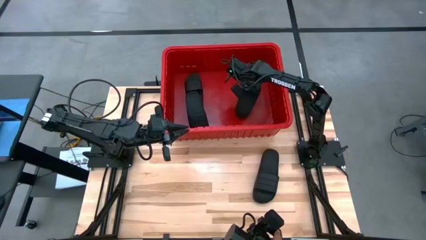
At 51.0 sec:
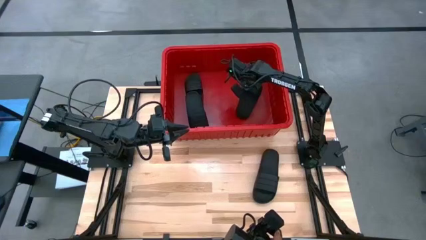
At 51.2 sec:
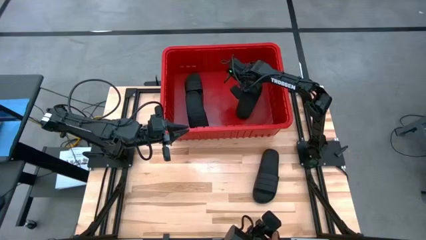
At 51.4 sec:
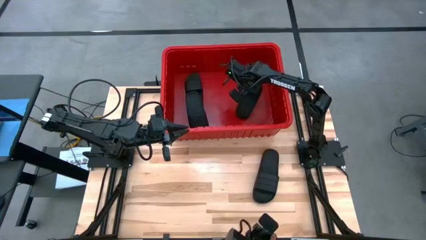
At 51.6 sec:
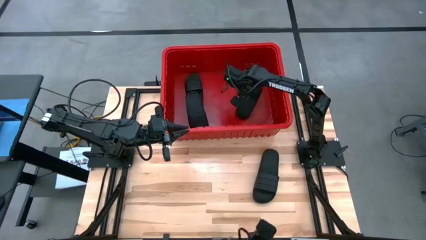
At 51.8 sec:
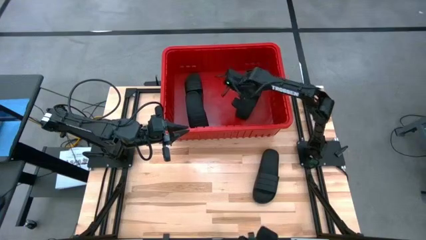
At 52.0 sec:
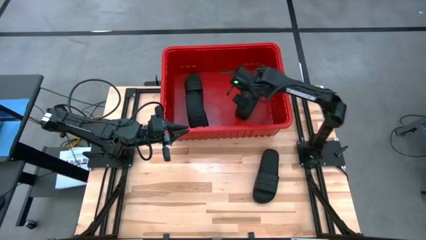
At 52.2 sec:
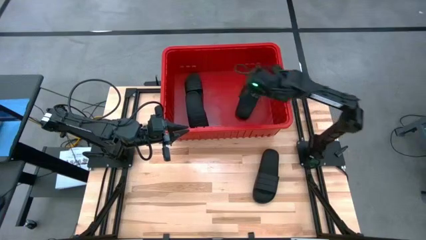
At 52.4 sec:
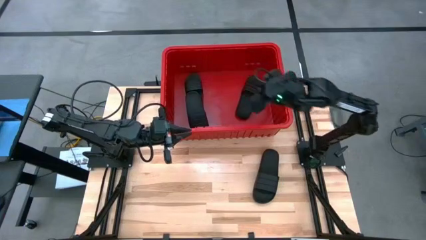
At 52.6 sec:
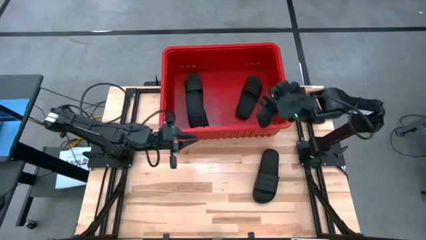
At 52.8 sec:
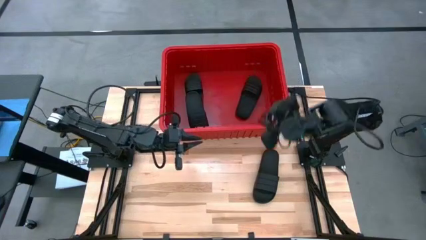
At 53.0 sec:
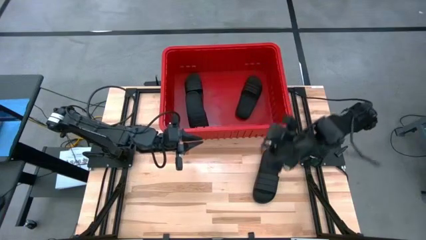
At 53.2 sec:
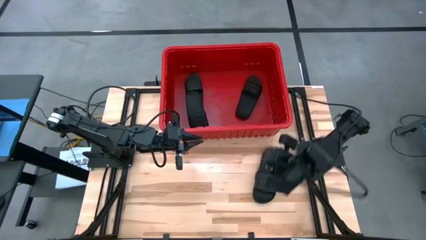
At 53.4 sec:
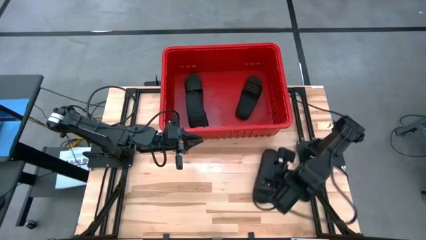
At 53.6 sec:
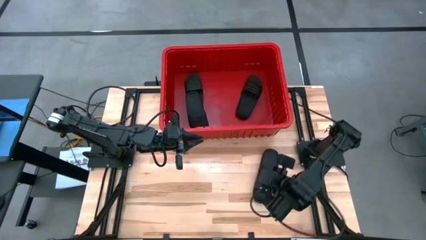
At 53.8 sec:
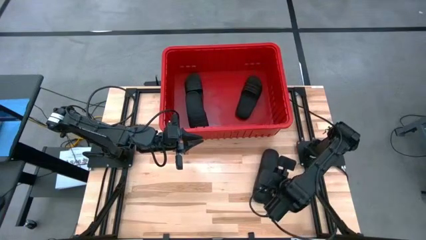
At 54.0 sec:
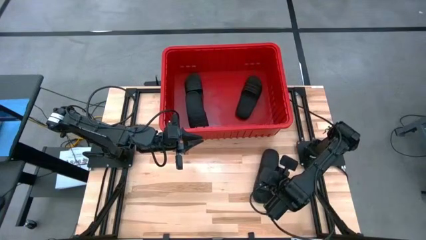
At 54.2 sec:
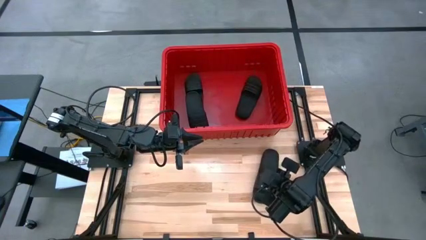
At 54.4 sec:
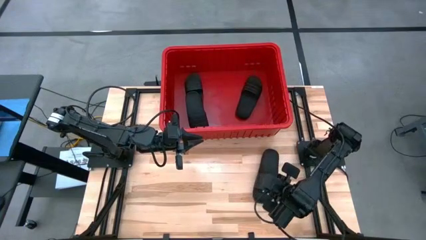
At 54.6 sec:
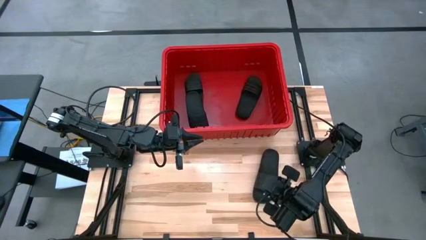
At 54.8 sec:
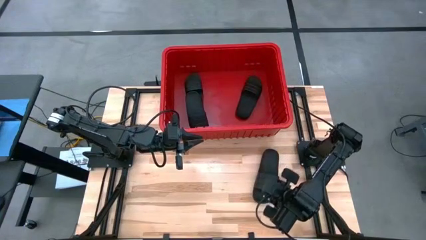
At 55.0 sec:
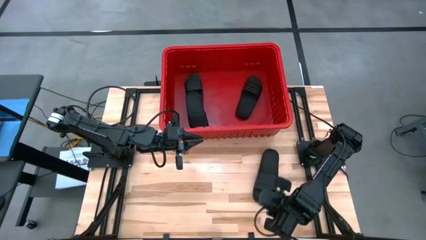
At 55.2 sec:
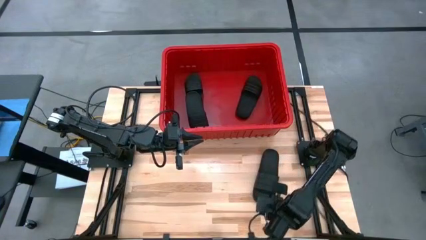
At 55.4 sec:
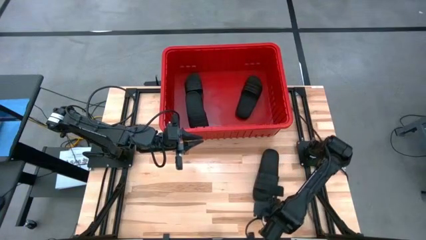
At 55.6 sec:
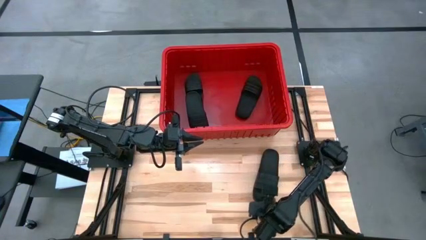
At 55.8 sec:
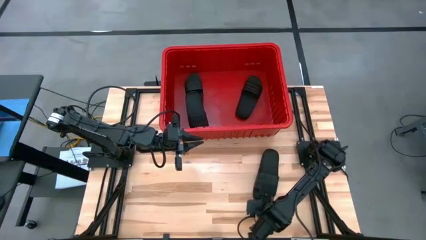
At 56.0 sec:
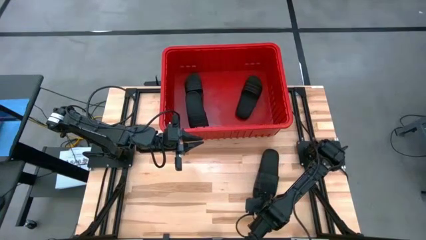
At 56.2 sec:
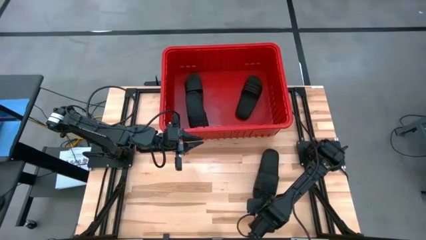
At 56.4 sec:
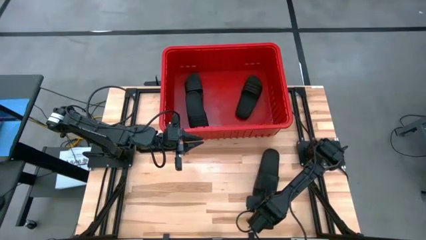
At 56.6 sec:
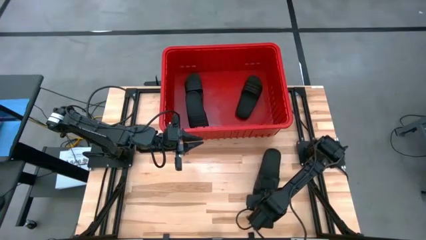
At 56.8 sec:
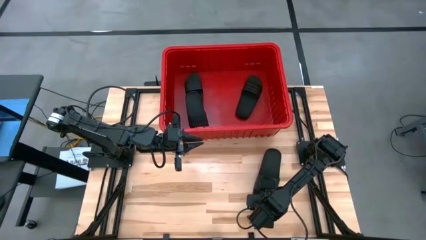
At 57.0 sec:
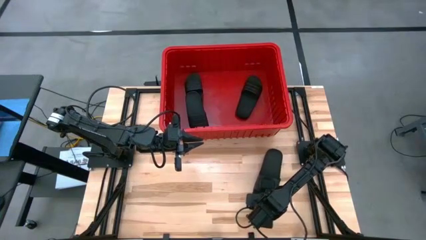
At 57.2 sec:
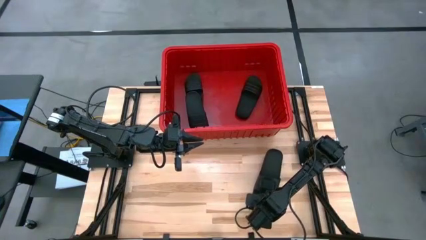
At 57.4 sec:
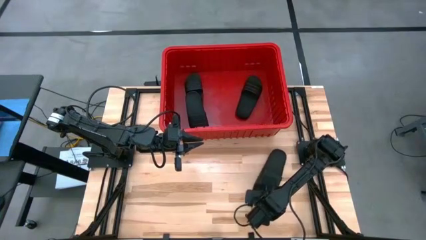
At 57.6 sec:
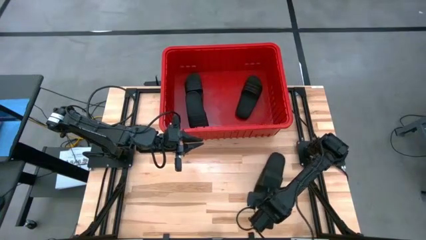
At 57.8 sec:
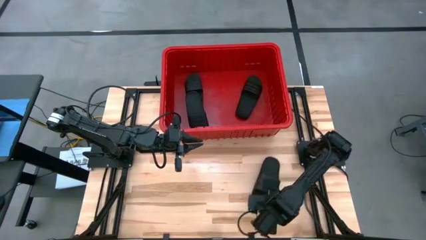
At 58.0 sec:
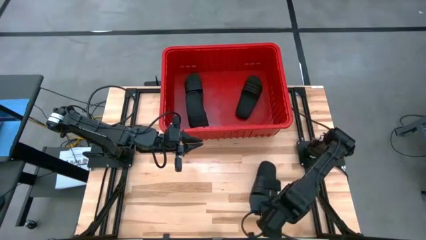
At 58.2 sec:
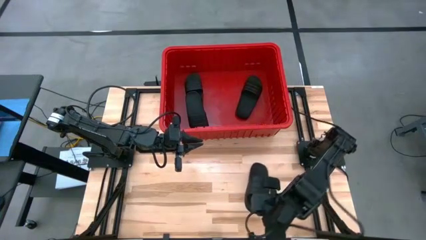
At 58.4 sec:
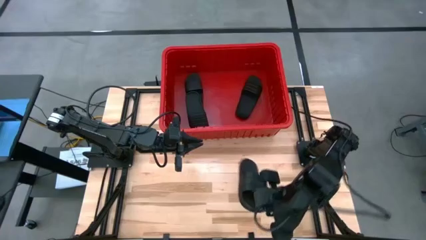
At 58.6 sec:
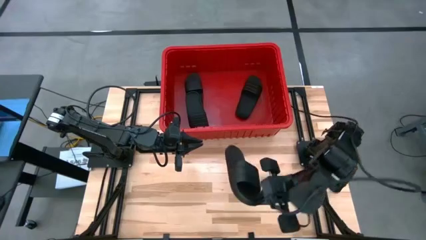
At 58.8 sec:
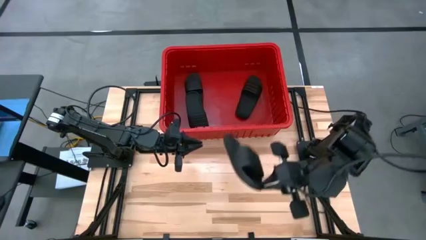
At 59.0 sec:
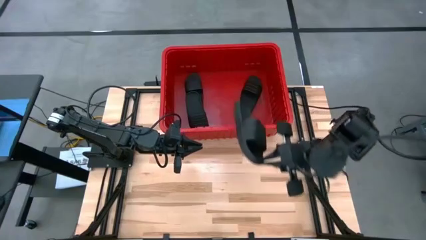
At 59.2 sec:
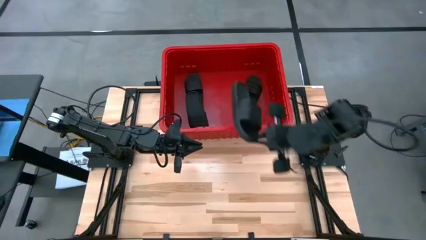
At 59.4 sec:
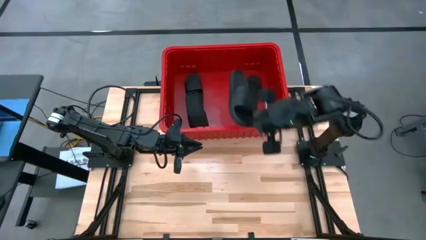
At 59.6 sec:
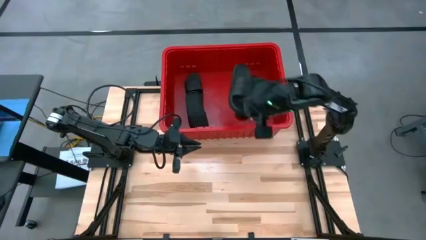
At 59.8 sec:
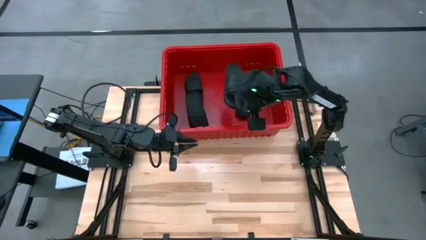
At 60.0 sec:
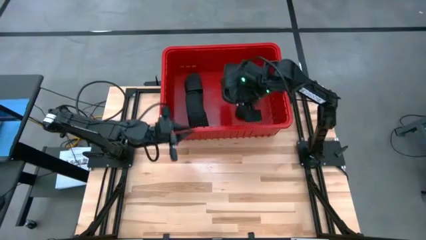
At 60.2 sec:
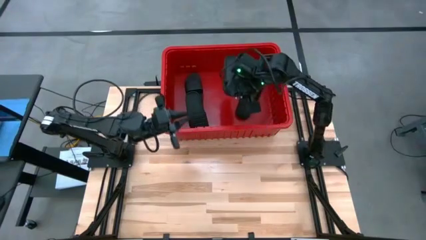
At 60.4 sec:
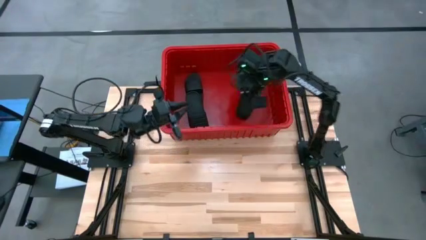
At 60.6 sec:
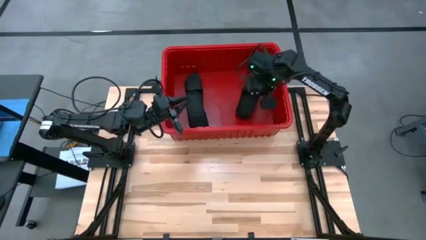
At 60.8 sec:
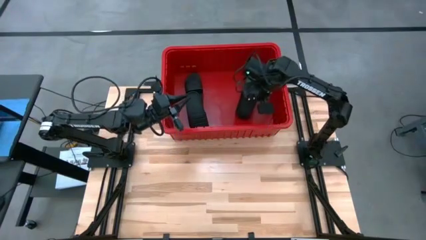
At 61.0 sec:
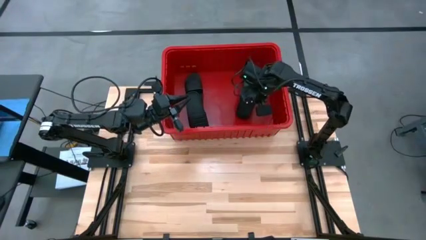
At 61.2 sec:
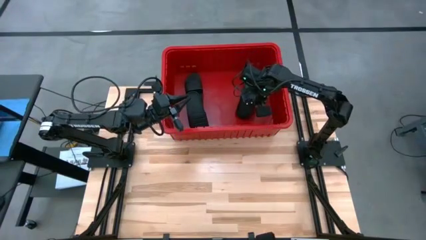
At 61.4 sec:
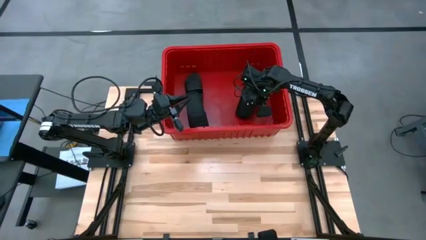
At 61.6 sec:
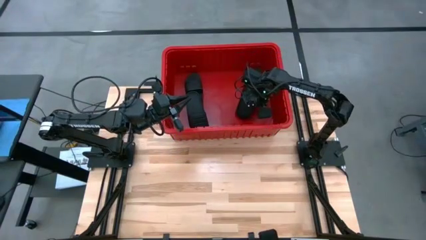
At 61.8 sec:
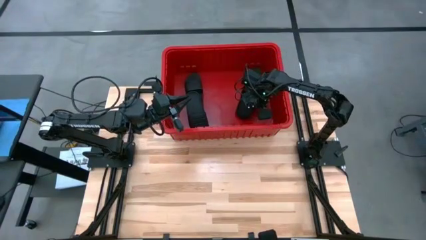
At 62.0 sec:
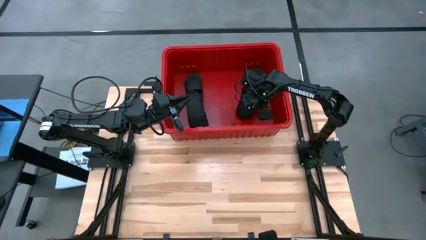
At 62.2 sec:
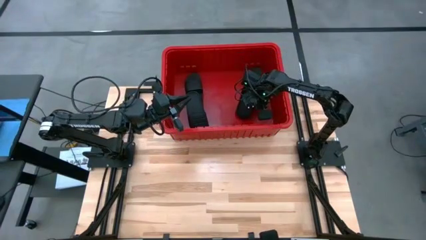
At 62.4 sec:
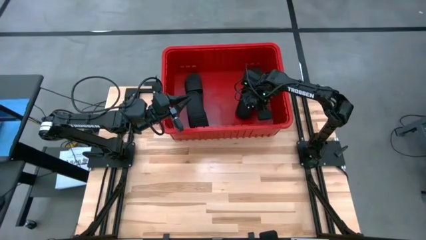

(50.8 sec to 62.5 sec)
Task: Pick and place slides into bin
Put the black slides into the red bin
